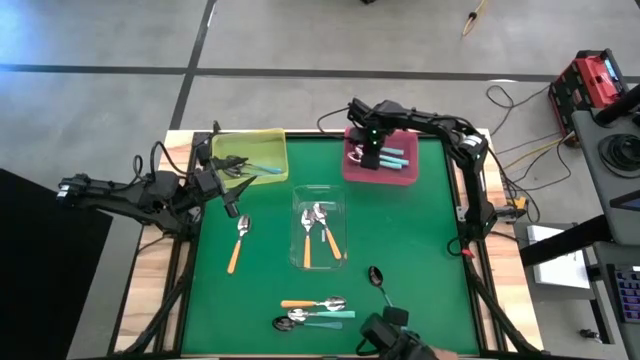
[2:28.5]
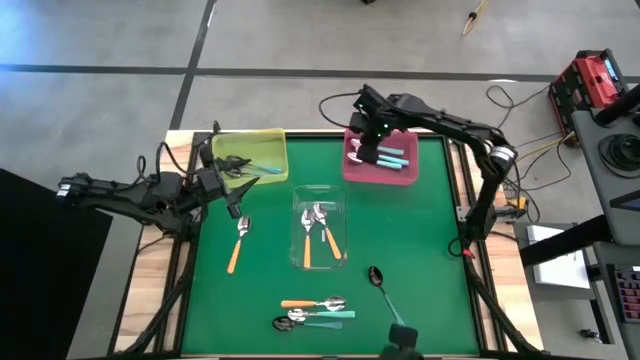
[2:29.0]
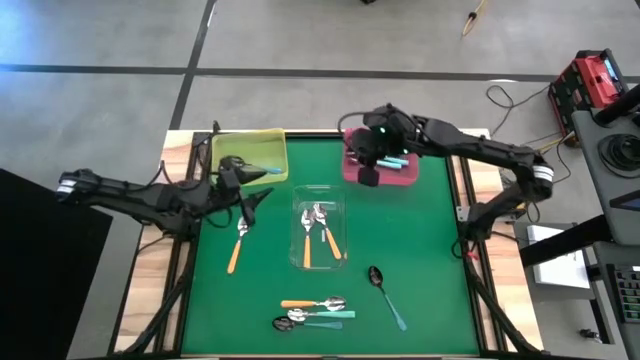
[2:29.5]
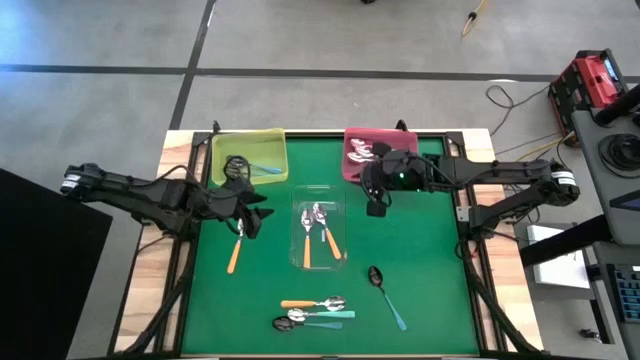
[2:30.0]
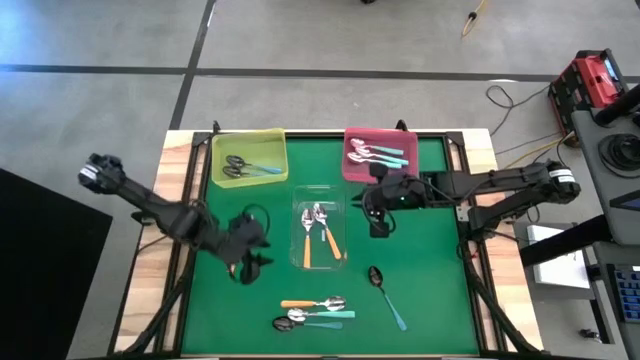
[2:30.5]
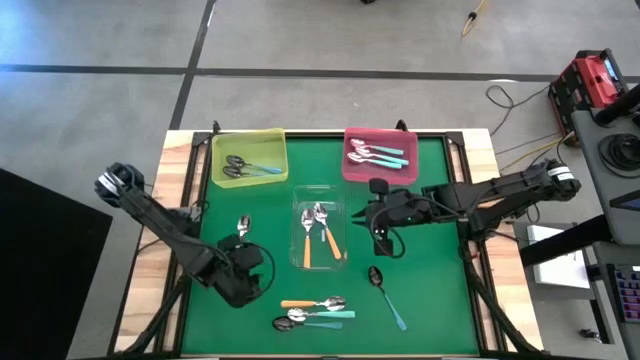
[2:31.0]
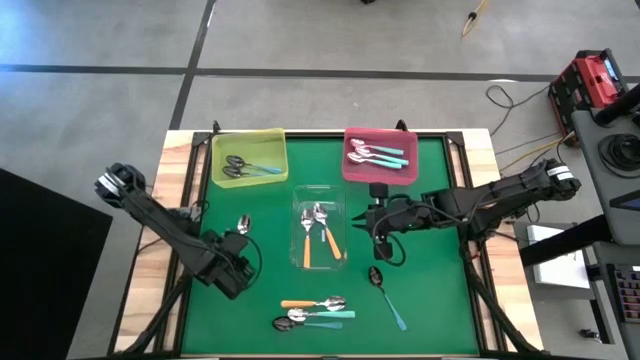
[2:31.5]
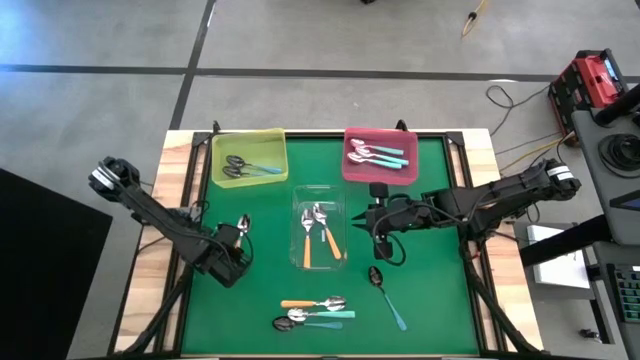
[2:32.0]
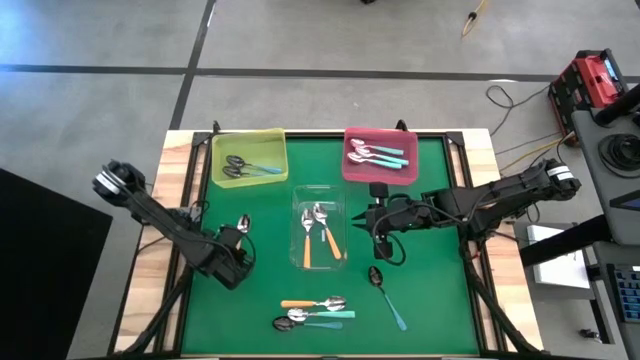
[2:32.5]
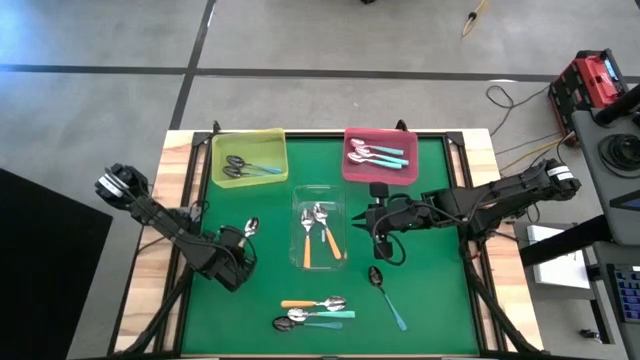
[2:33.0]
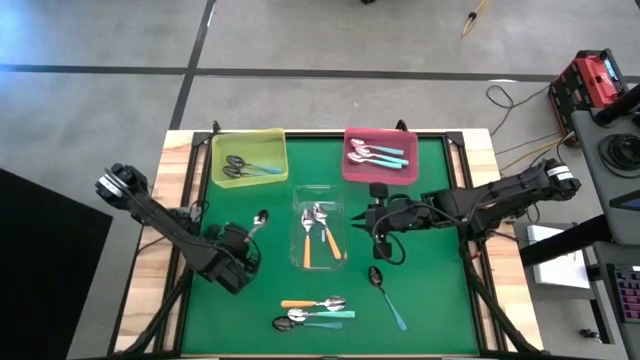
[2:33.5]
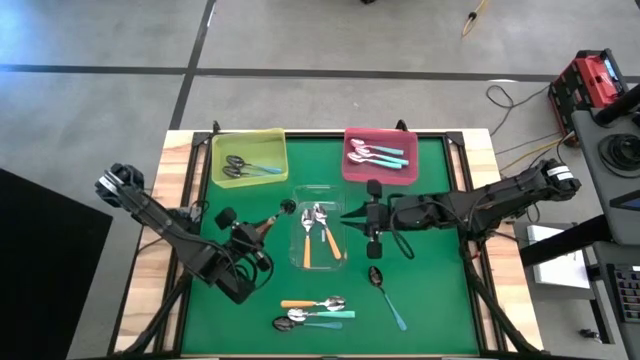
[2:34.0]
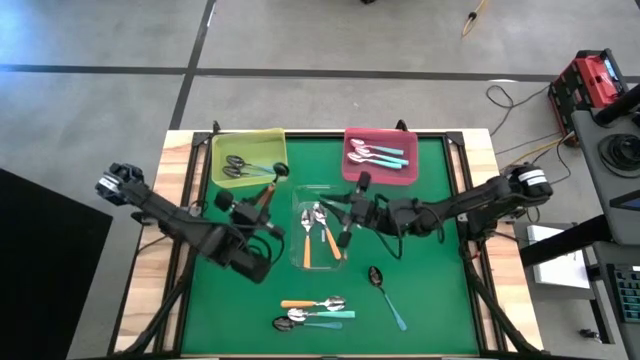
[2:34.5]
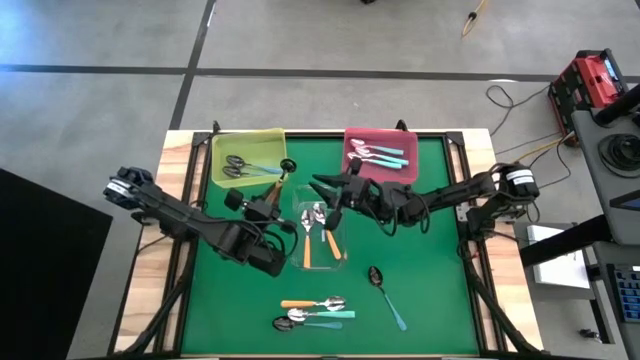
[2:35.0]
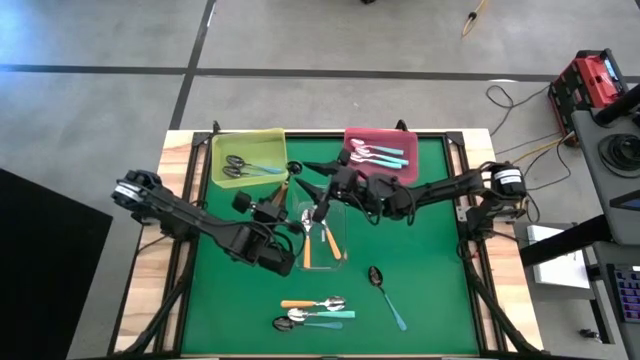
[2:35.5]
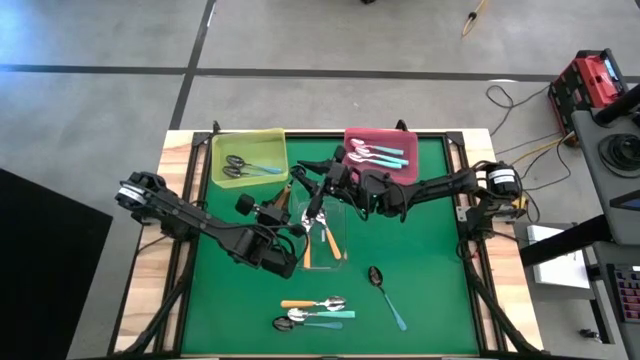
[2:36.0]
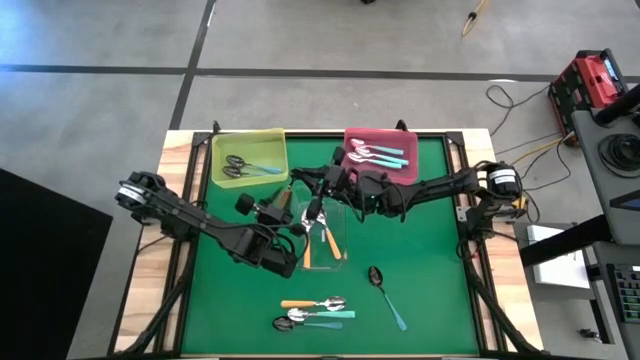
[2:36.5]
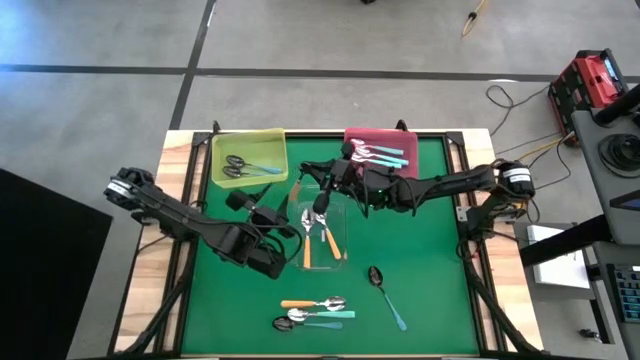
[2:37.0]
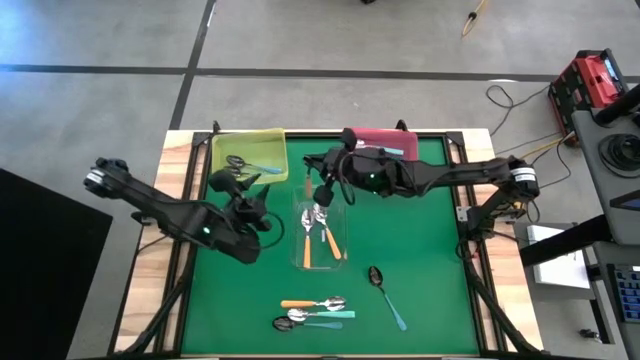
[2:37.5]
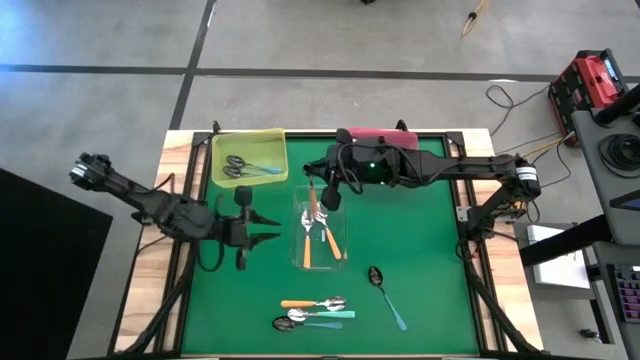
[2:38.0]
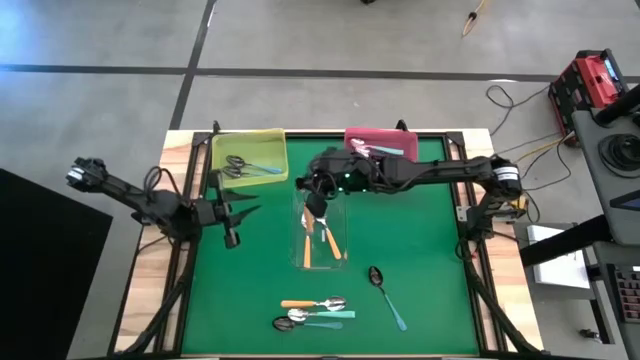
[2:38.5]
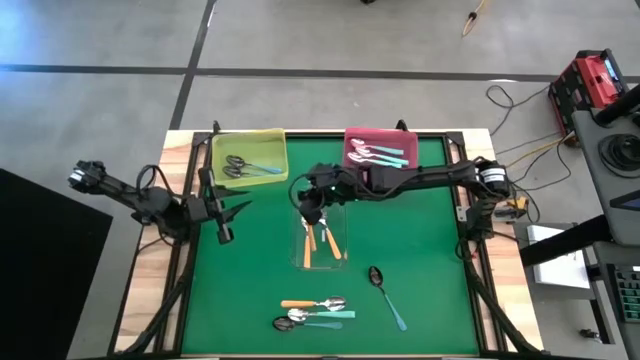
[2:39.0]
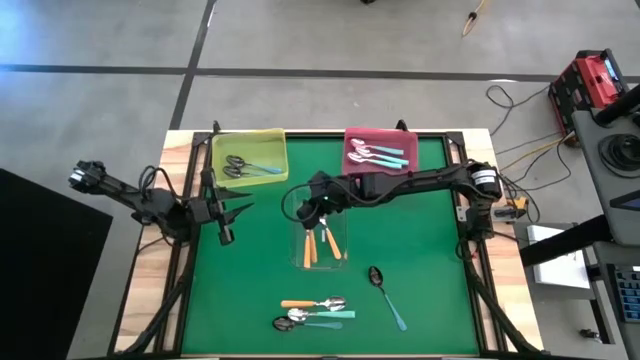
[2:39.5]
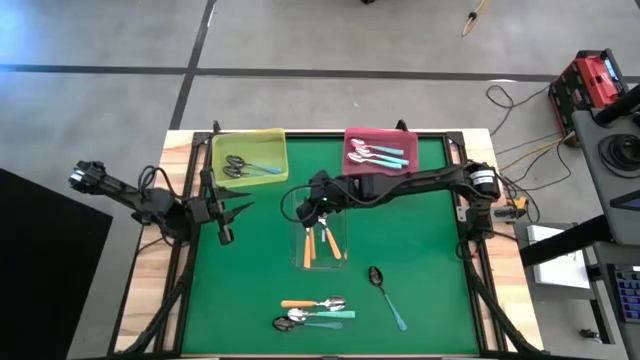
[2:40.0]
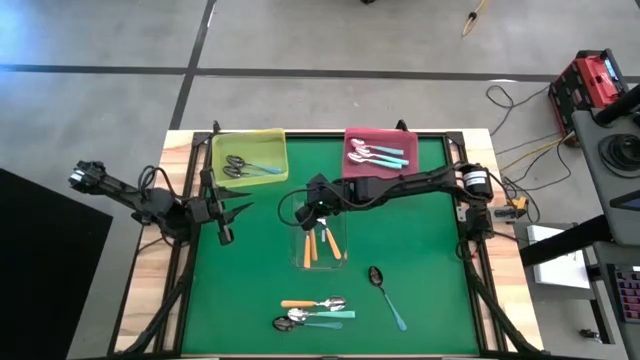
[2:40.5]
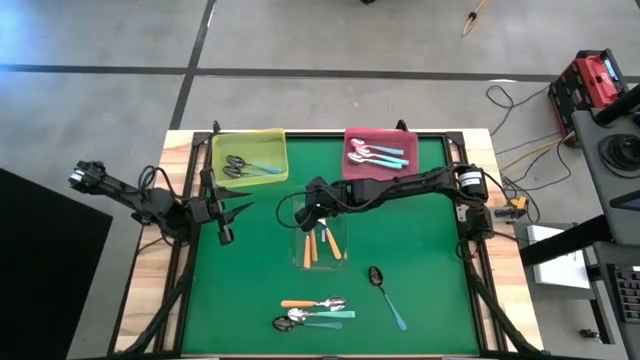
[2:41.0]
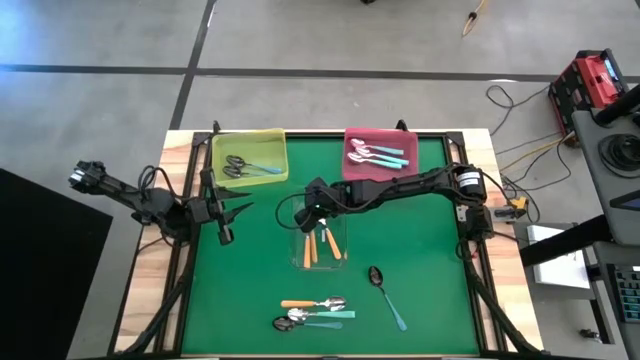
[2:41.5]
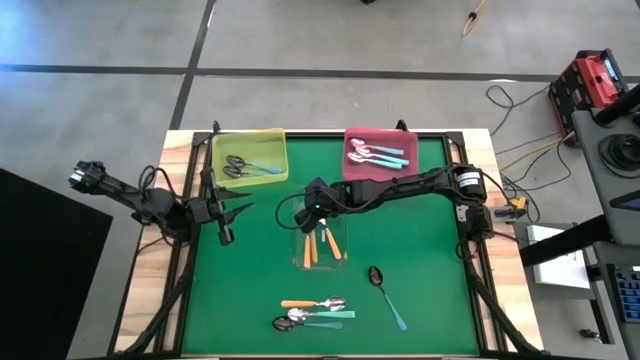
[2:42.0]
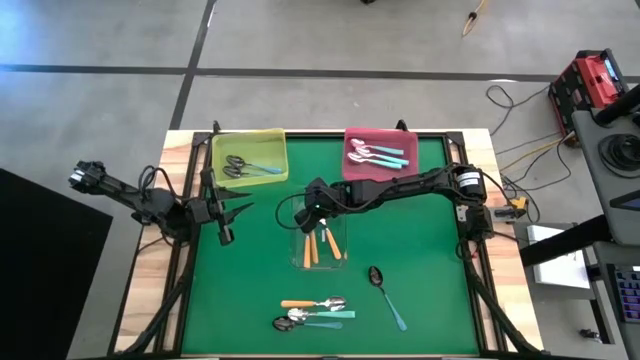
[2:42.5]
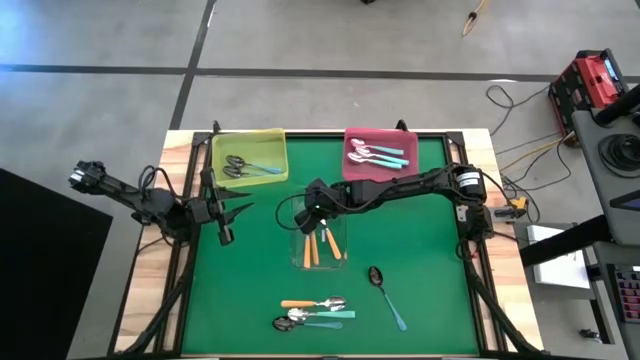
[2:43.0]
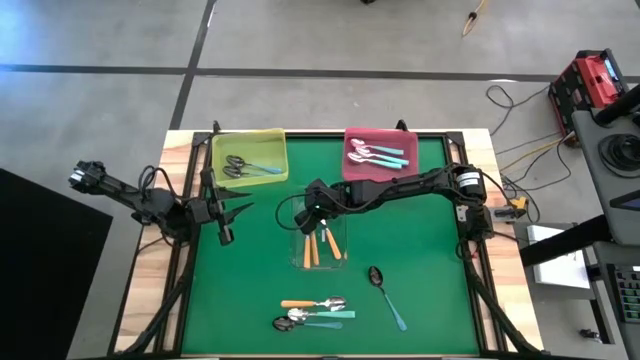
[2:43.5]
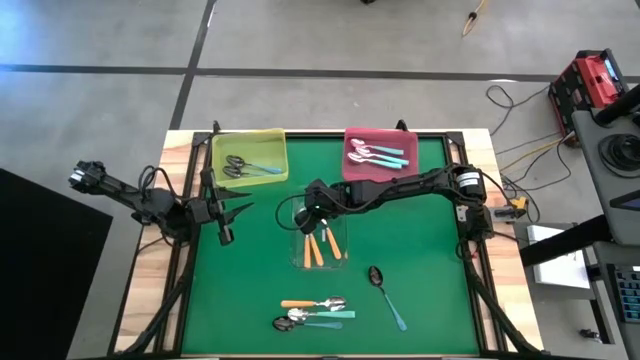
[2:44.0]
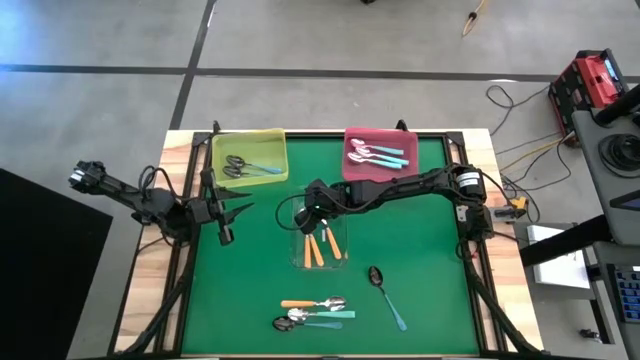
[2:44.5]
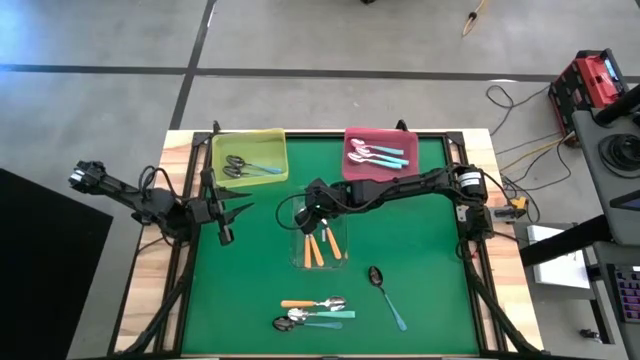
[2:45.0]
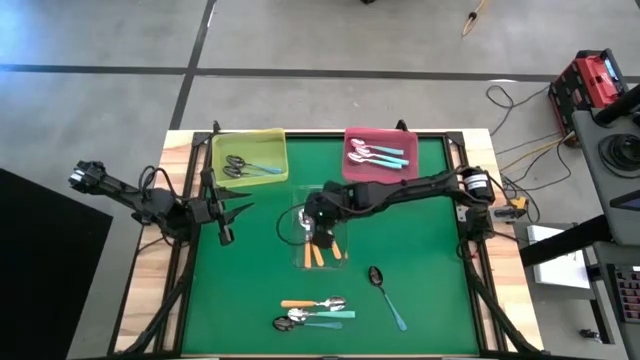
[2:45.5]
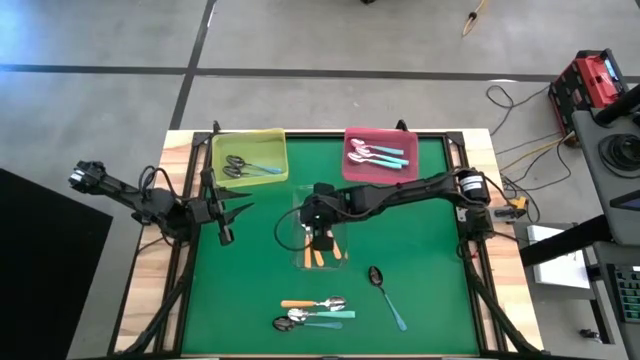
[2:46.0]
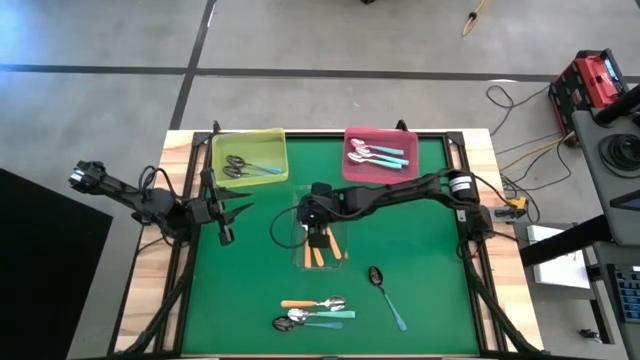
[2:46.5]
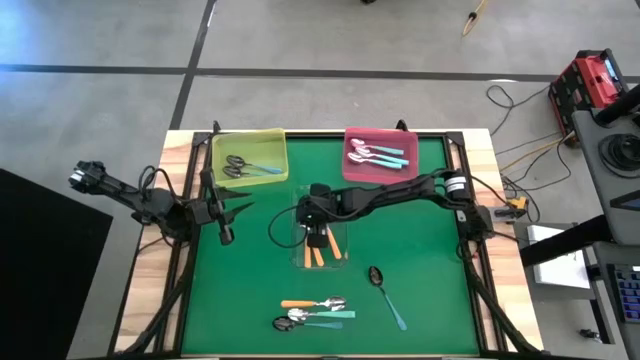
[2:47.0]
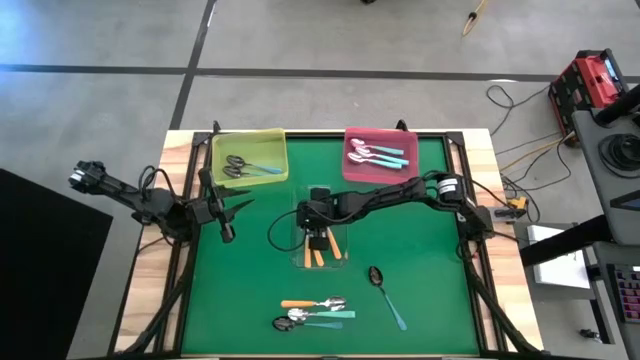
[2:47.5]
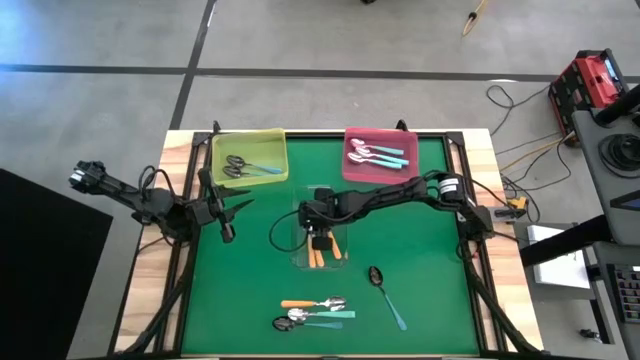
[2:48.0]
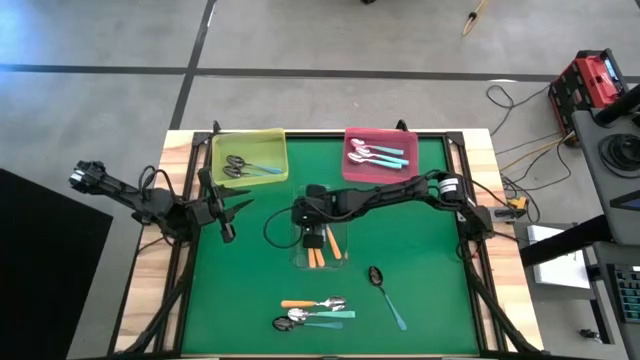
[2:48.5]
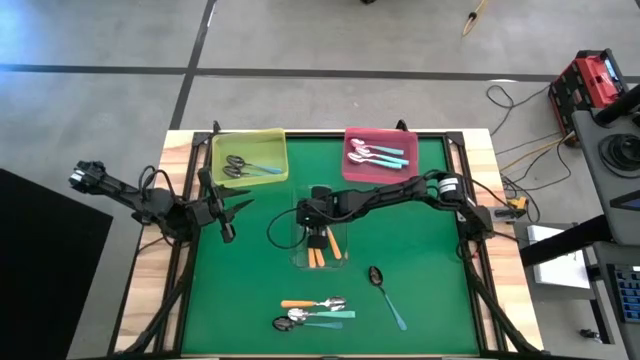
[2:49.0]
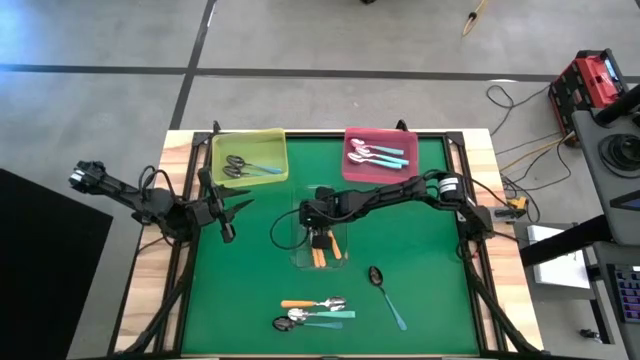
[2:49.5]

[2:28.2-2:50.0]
Task: Sort silverware by color (type)
Put the left yellow spoon into the transparent bin
